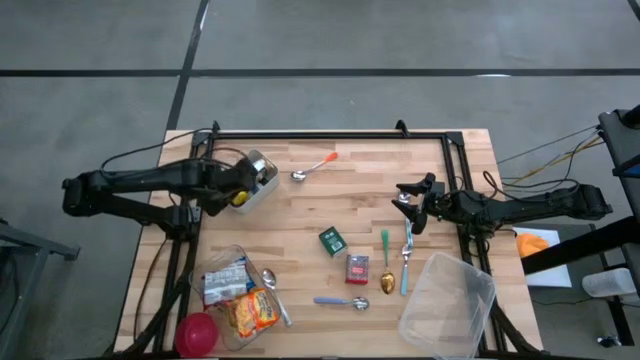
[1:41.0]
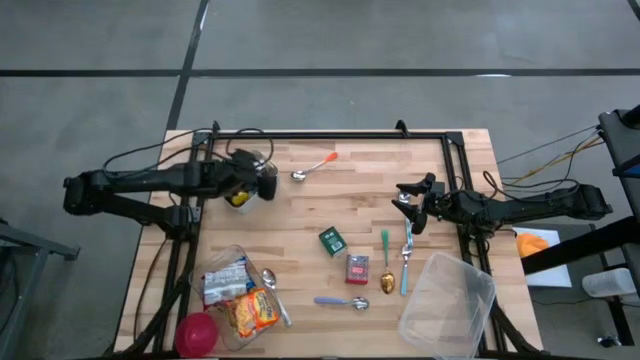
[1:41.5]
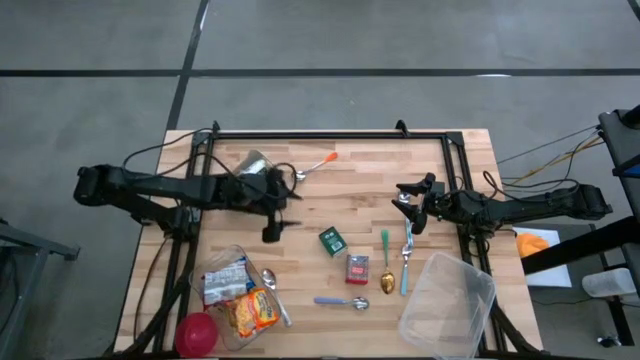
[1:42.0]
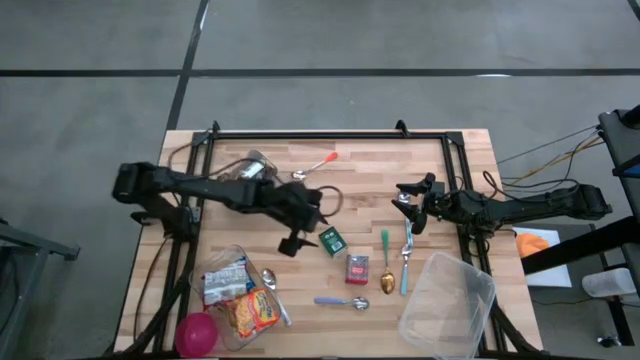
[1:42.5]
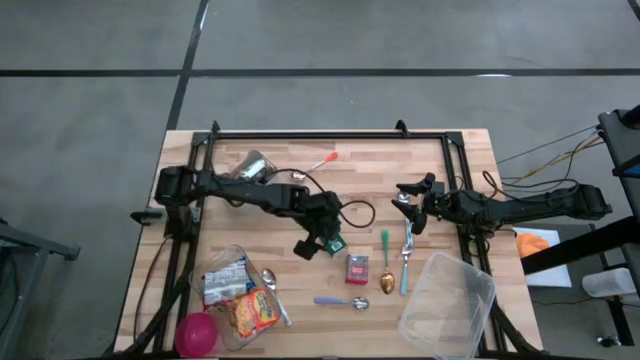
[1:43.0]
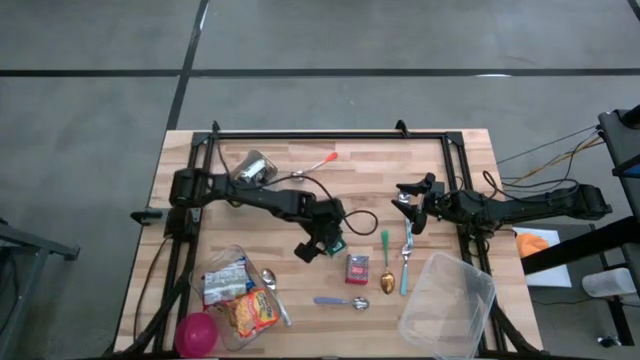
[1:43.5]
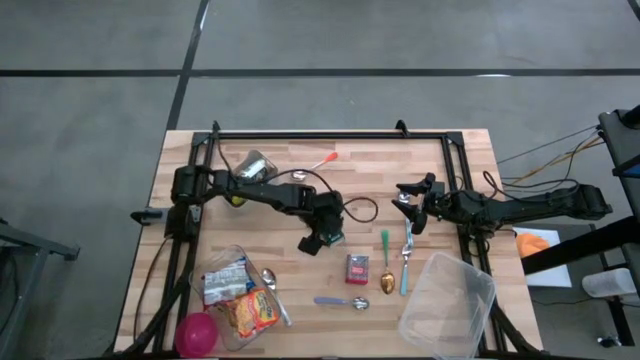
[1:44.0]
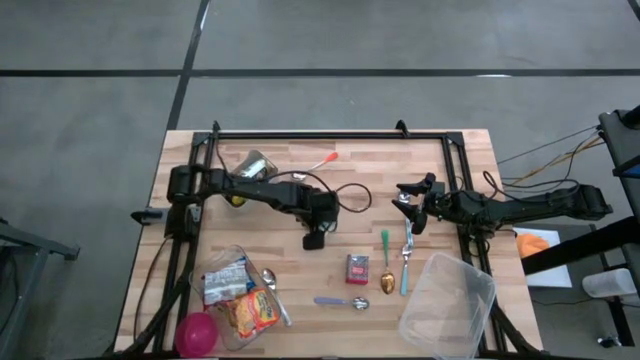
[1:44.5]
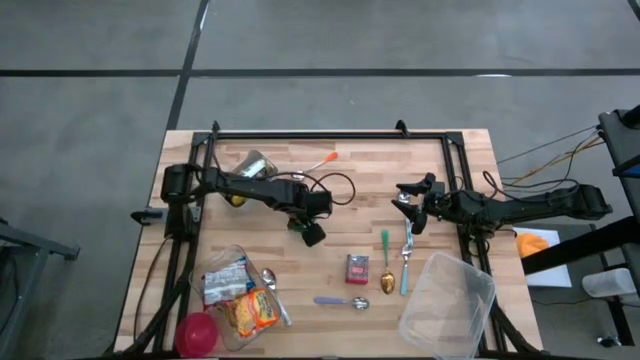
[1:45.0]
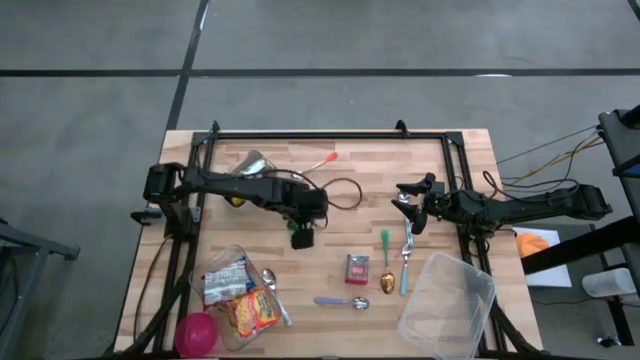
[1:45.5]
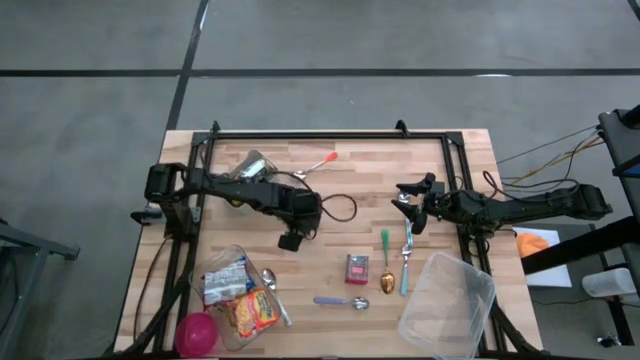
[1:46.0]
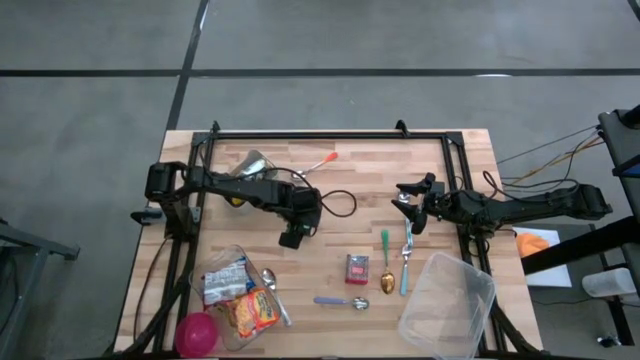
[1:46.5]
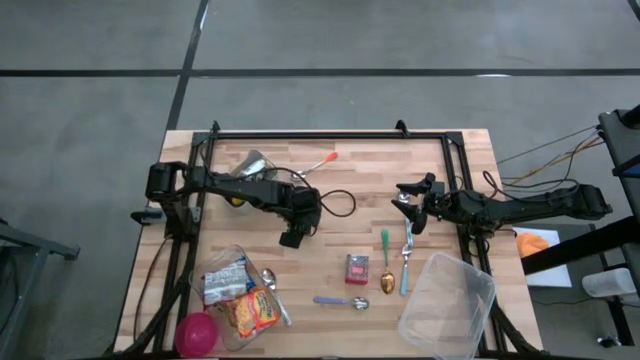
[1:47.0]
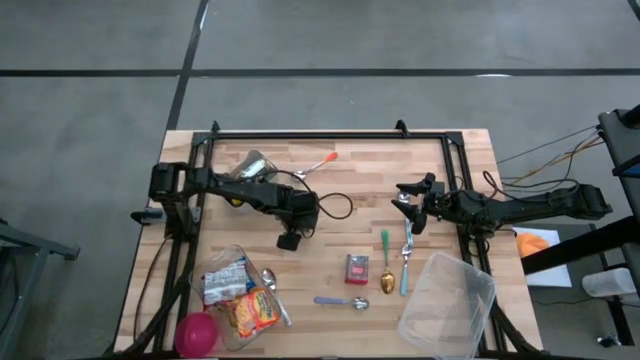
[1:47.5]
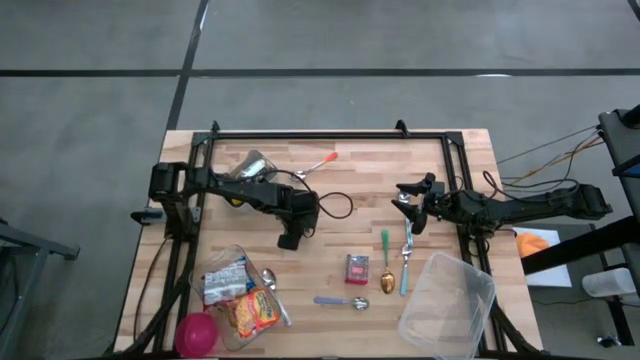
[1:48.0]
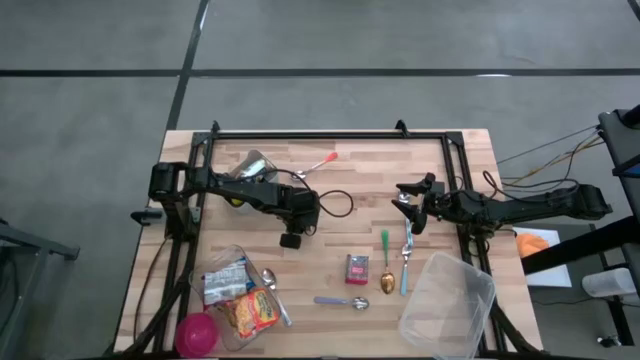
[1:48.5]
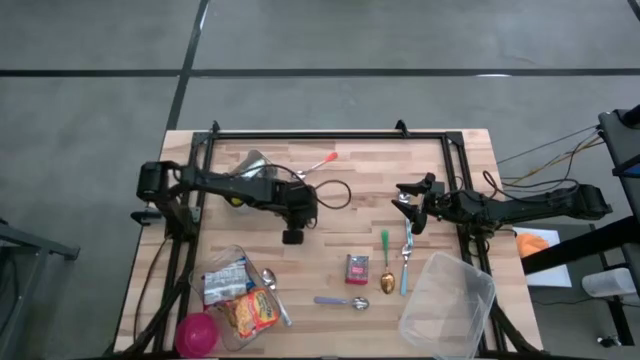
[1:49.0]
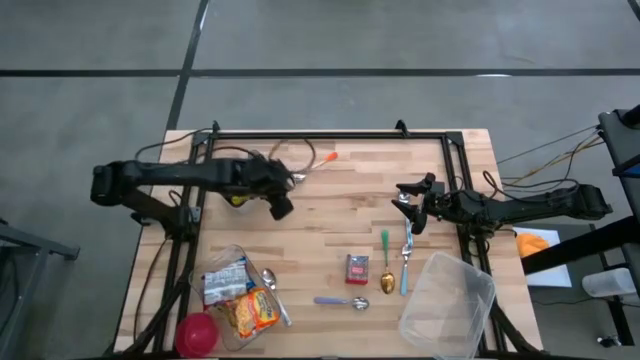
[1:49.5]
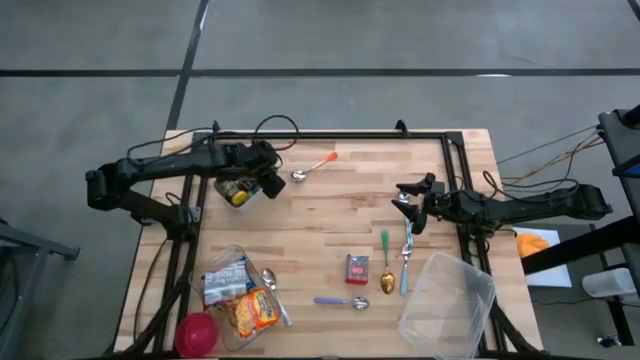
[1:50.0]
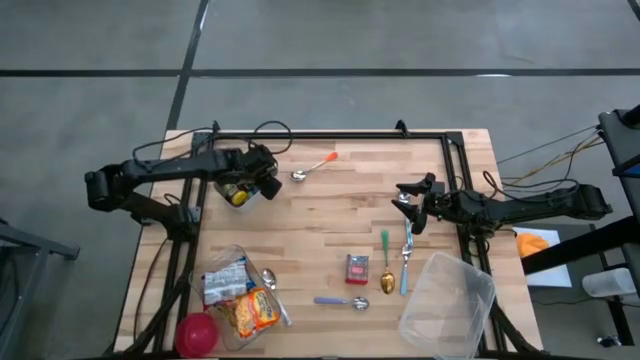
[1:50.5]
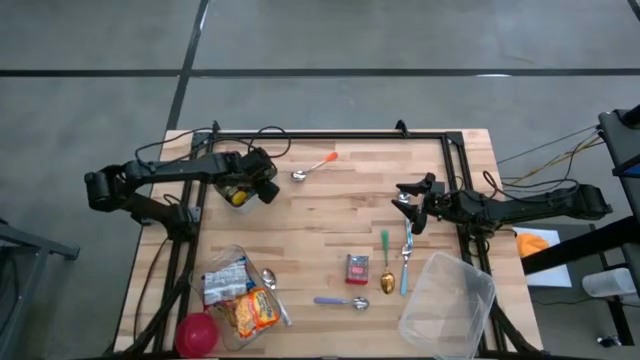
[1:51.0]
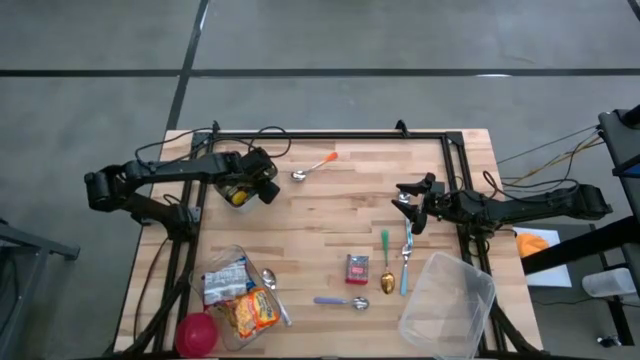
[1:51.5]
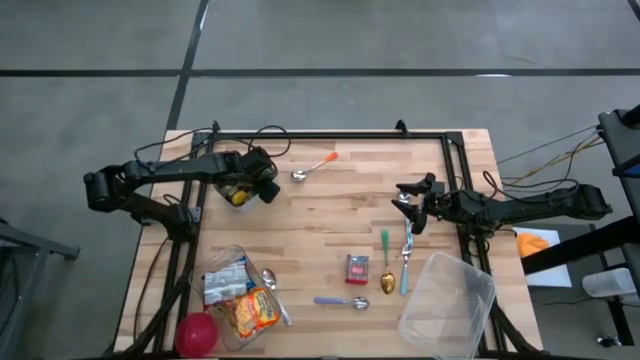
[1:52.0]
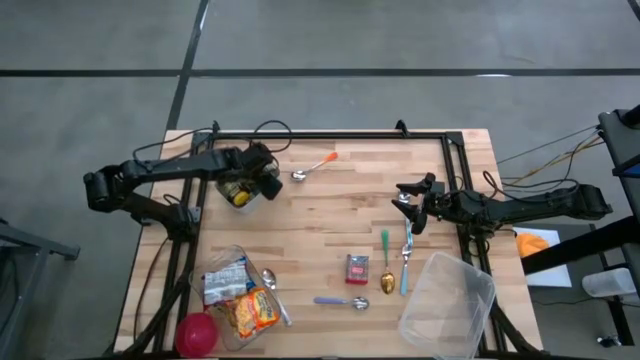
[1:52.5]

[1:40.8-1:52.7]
Put the black seasoning can into the gray bin
